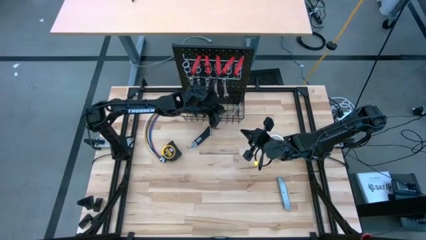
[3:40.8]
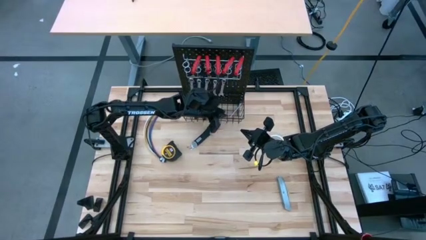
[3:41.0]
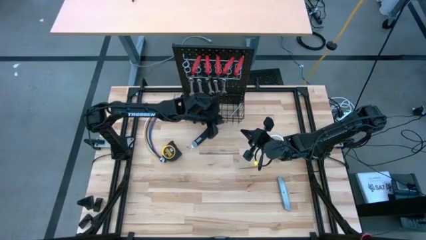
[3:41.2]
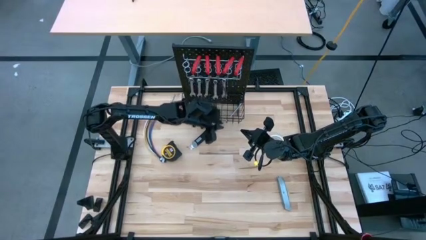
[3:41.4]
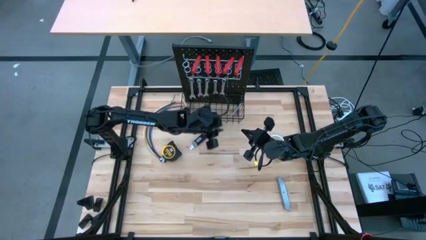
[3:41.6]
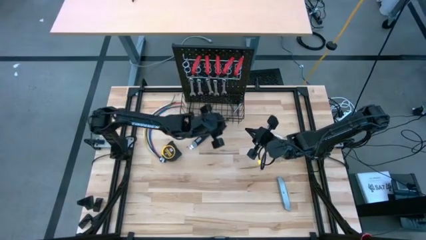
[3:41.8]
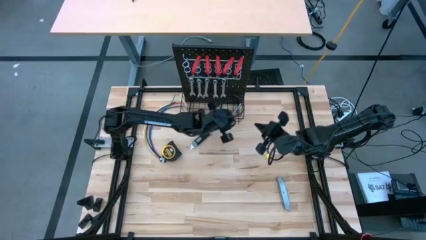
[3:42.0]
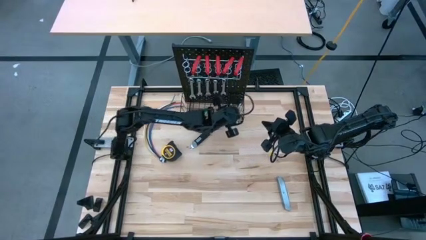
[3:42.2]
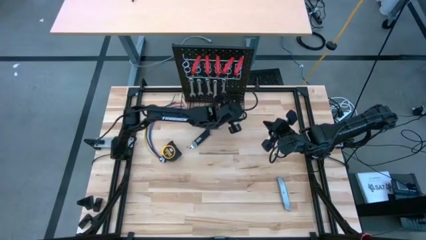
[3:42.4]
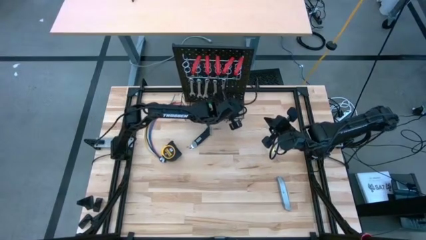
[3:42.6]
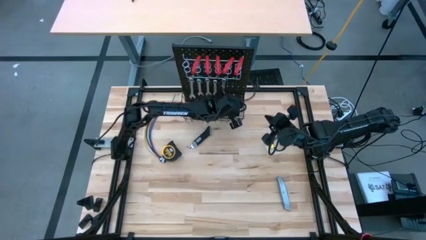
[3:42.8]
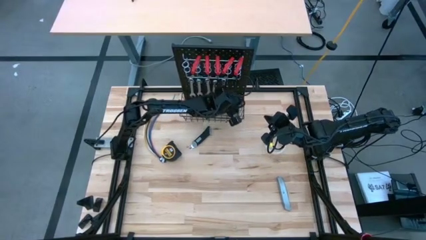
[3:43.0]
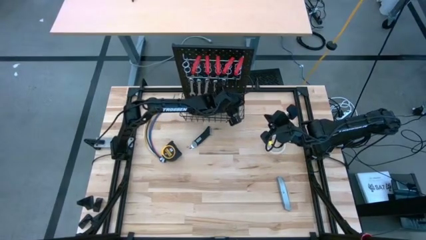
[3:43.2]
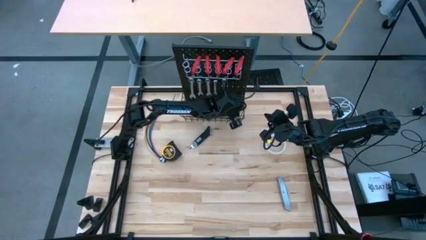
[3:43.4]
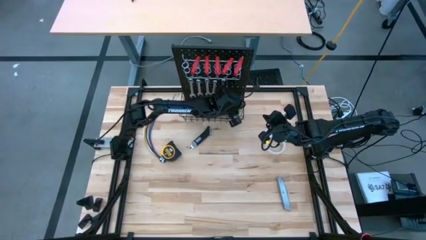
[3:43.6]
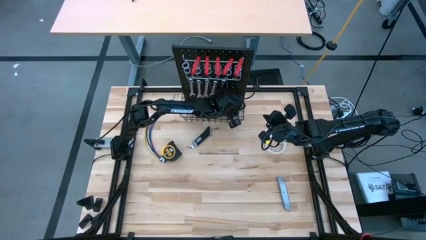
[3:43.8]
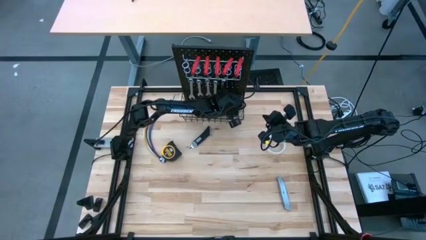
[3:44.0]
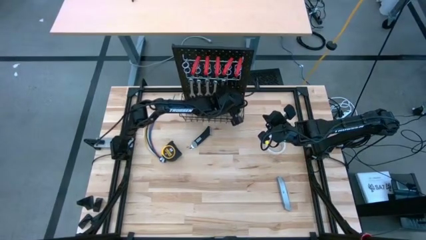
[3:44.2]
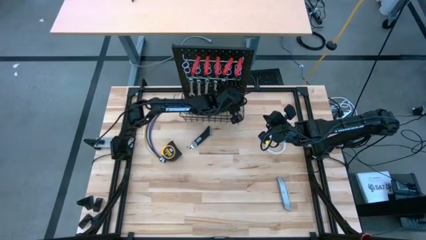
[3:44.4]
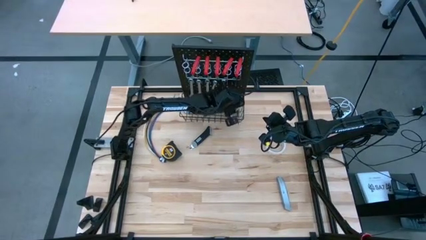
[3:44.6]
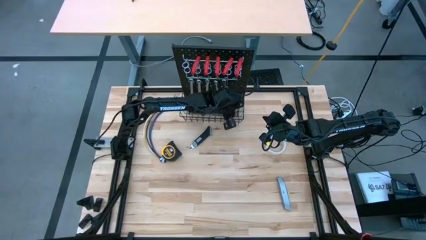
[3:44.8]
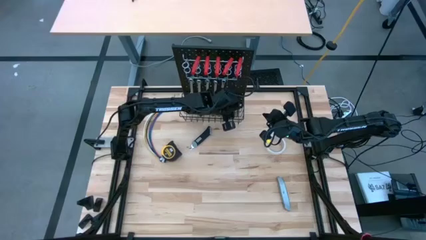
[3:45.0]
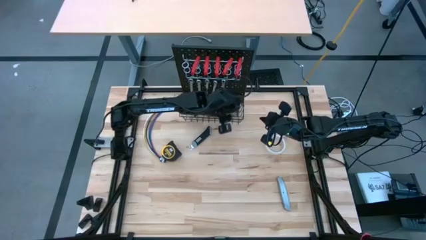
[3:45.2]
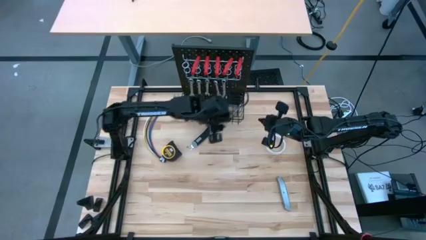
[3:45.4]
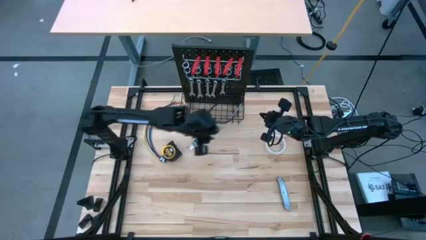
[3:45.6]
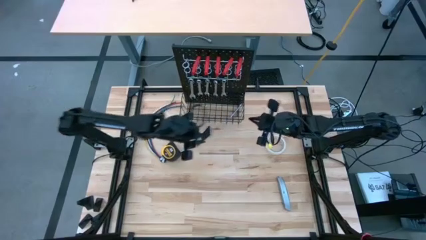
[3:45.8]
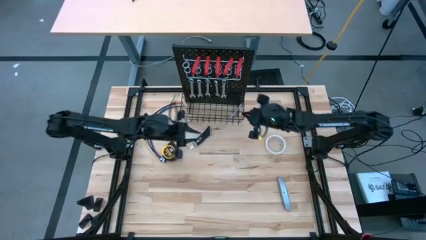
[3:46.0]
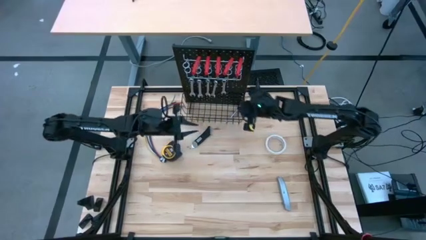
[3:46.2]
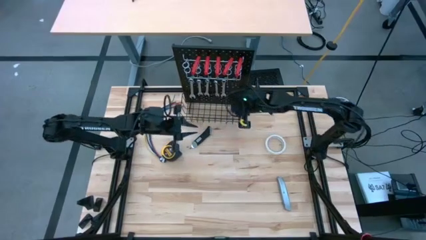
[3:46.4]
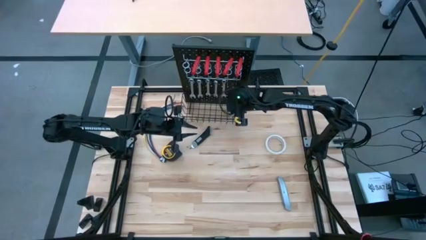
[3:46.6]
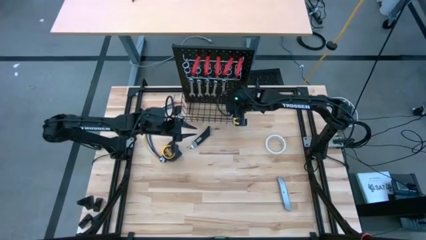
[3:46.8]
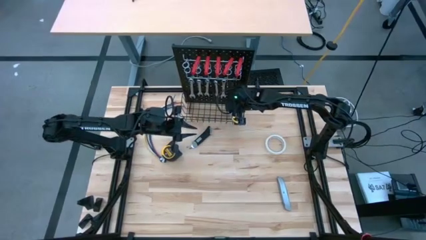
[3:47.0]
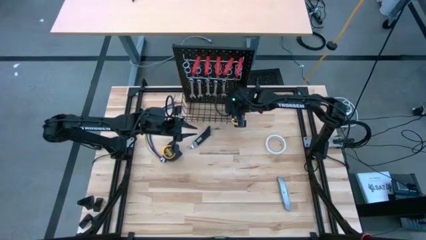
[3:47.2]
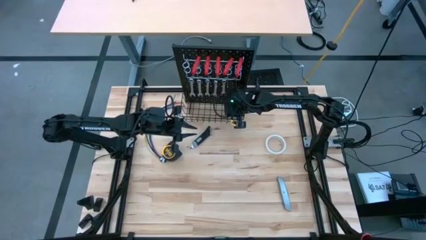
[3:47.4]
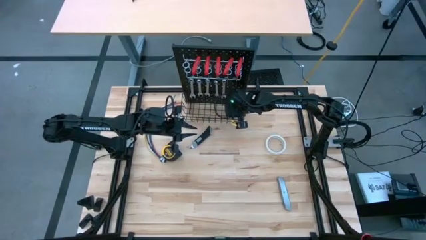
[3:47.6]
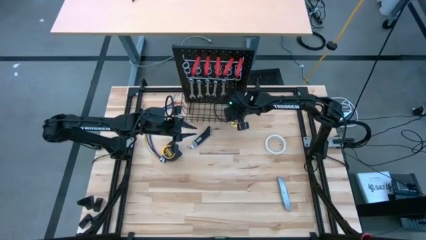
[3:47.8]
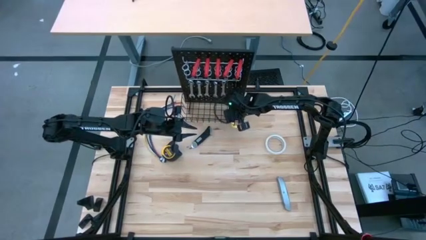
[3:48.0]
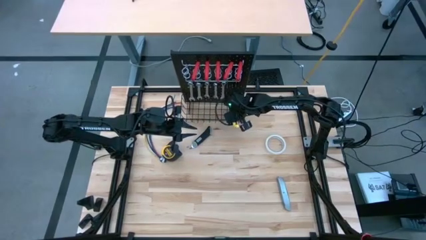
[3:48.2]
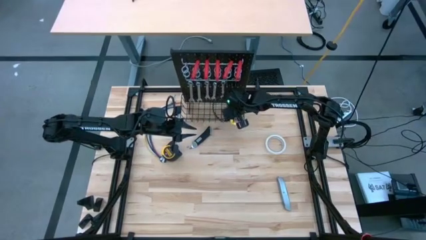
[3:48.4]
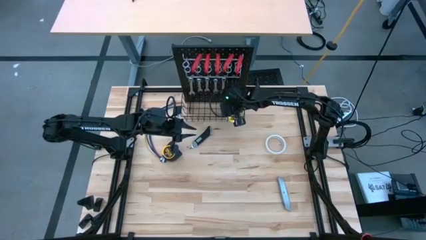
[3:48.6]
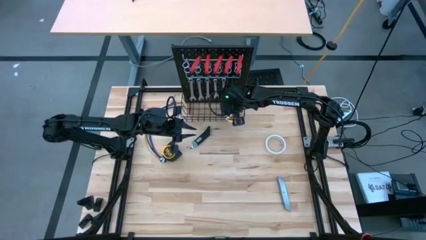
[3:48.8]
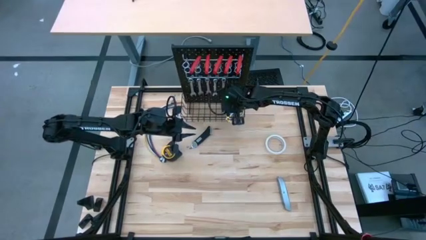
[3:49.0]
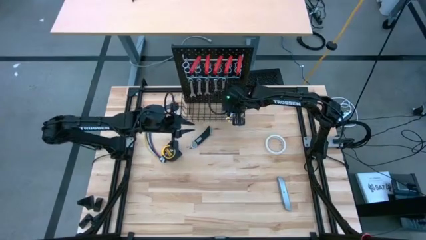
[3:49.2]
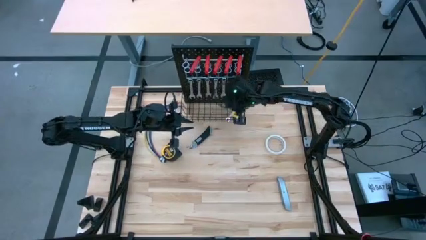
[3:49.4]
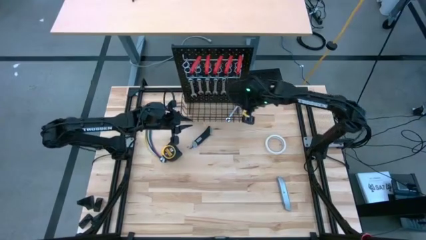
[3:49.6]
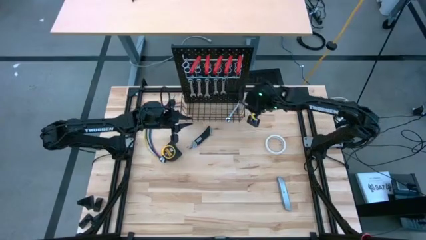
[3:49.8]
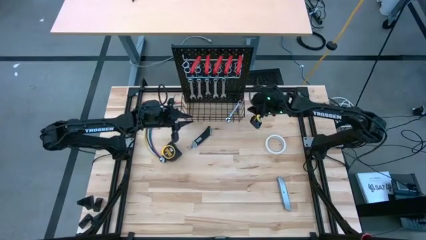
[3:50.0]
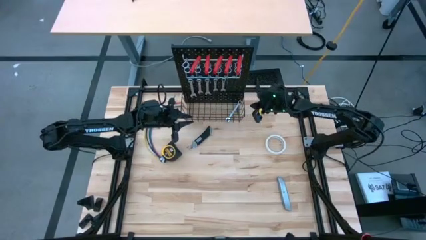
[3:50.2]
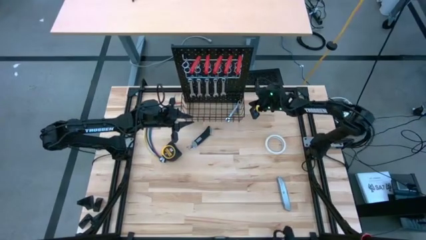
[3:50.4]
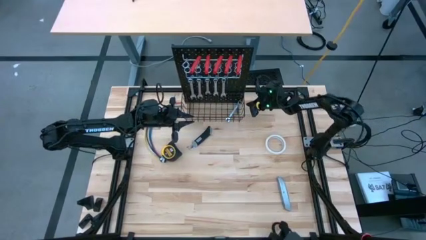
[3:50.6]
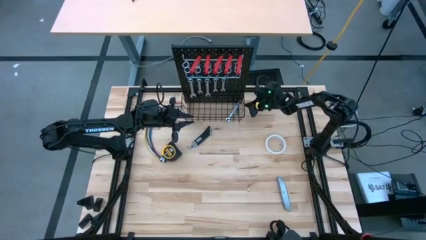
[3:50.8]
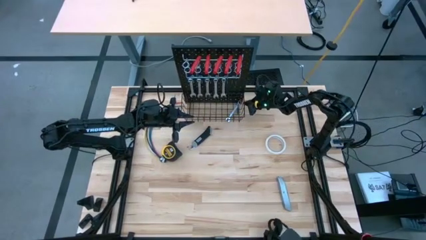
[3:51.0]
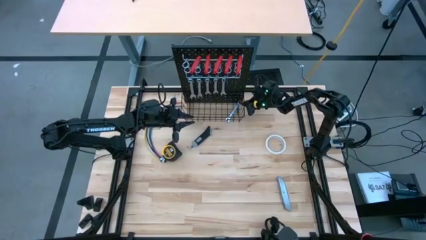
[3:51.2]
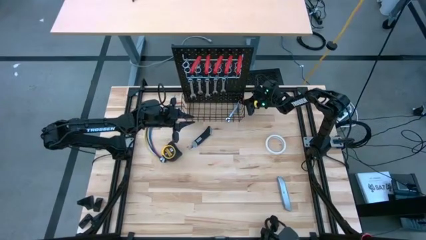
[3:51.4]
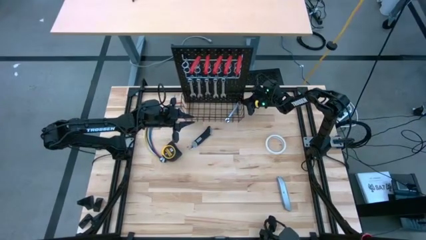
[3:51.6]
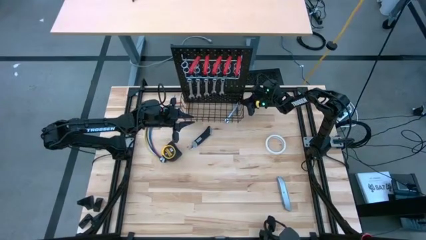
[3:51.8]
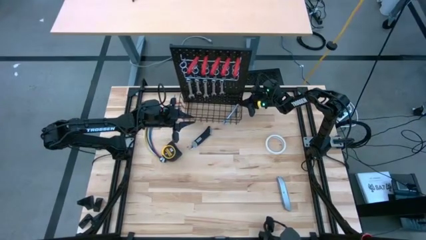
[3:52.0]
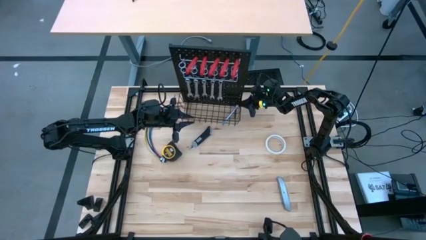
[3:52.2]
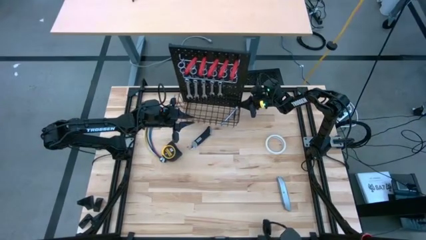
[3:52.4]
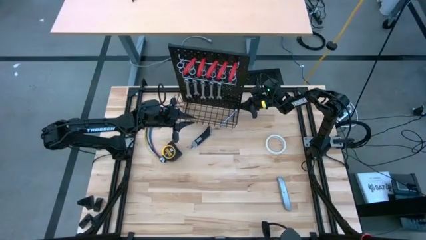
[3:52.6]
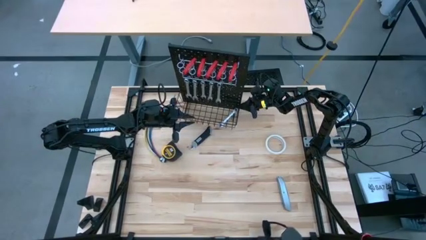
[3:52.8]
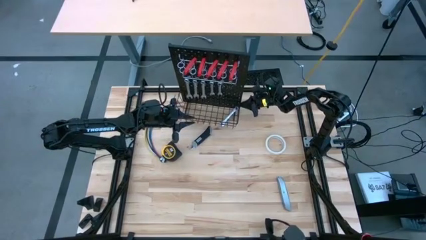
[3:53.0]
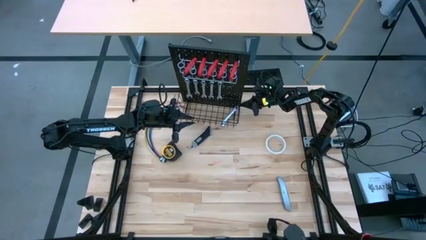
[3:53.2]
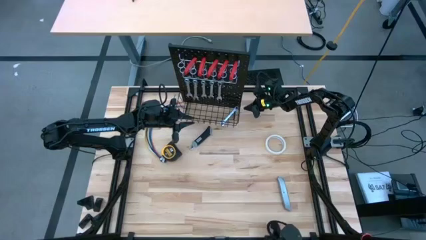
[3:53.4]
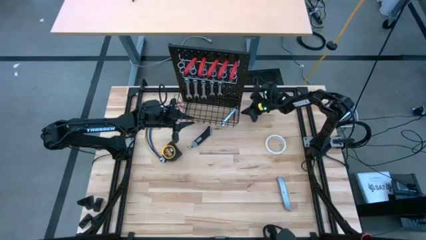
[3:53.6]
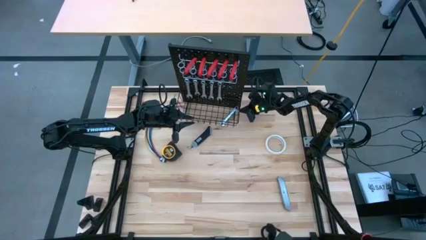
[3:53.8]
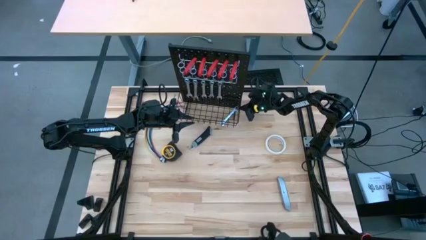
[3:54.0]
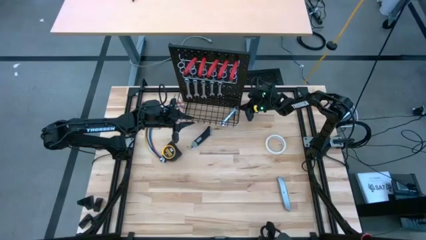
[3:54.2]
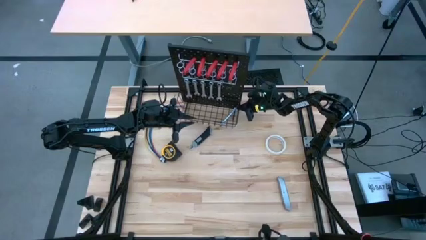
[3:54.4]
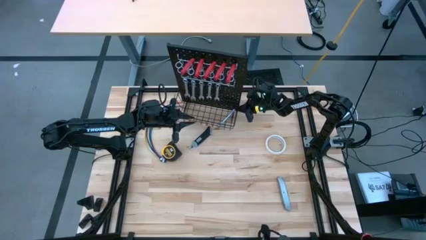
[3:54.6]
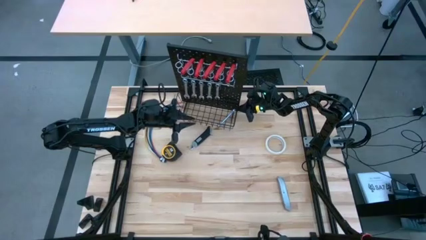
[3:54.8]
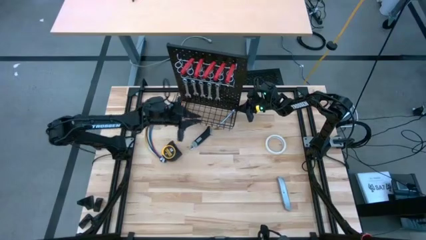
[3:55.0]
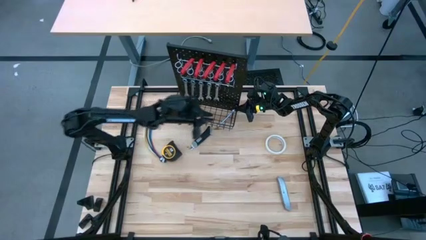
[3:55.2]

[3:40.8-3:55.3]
Task: Hang tools onto peg board
Hang the wrench on the peg board

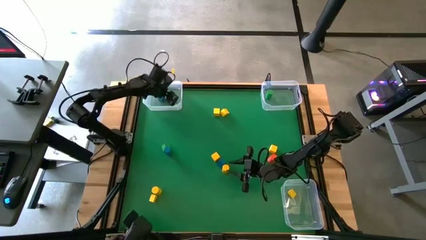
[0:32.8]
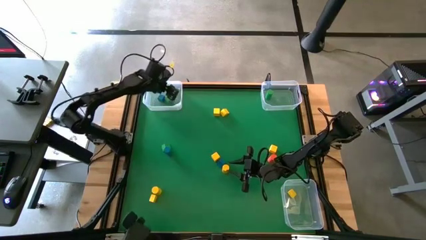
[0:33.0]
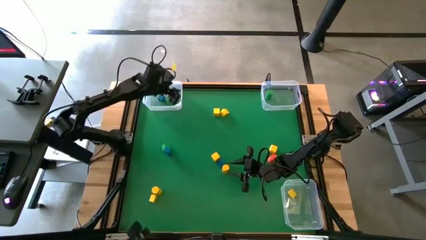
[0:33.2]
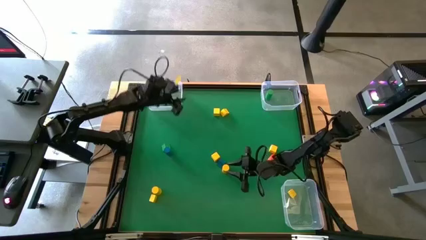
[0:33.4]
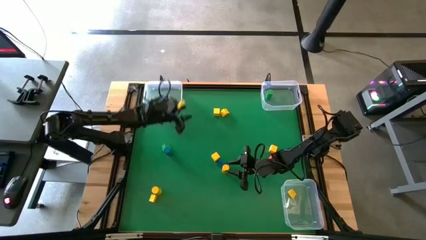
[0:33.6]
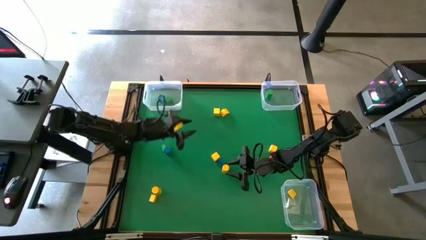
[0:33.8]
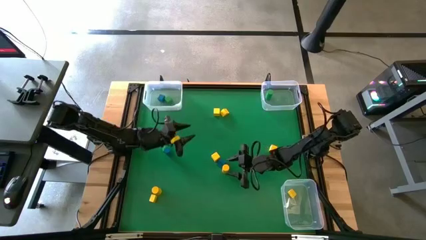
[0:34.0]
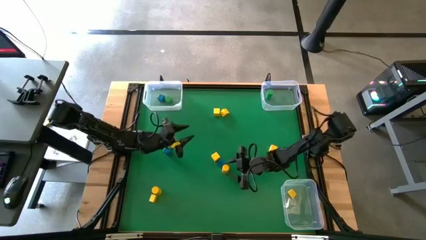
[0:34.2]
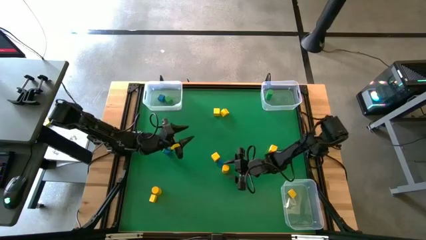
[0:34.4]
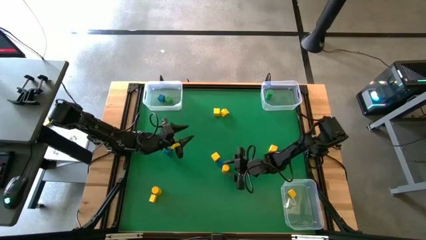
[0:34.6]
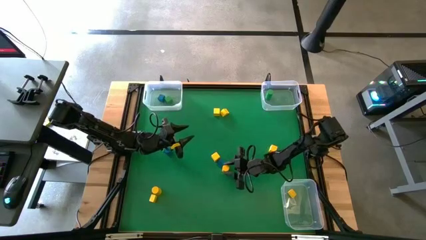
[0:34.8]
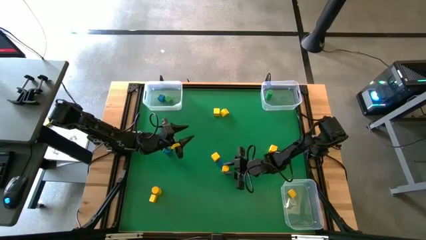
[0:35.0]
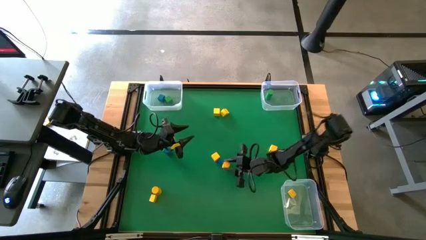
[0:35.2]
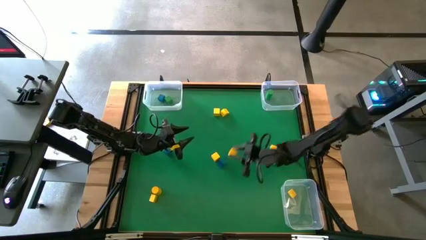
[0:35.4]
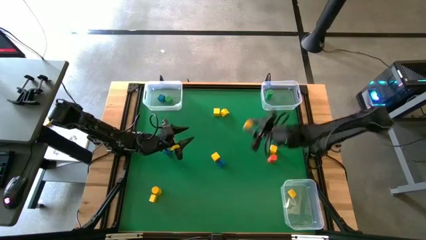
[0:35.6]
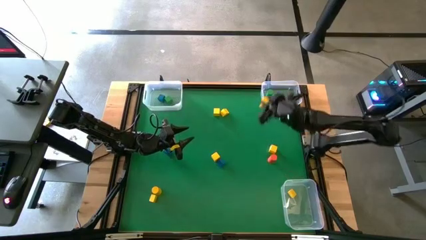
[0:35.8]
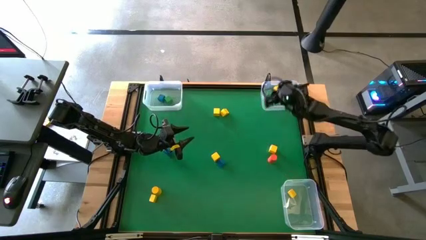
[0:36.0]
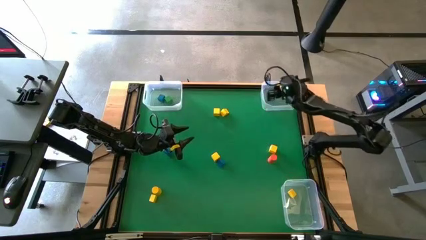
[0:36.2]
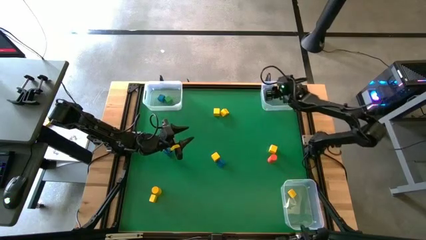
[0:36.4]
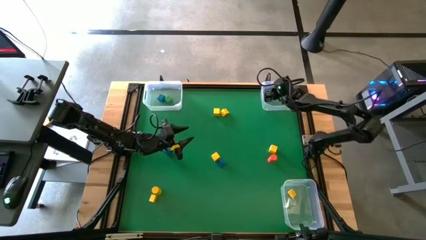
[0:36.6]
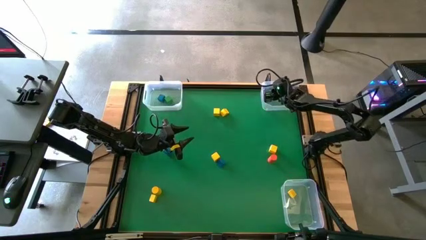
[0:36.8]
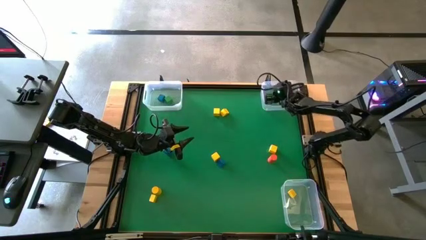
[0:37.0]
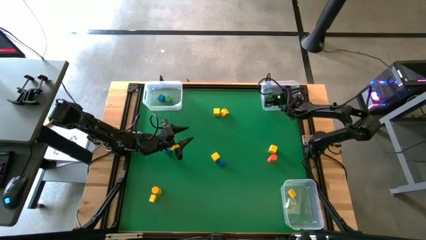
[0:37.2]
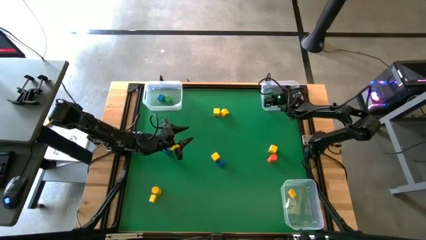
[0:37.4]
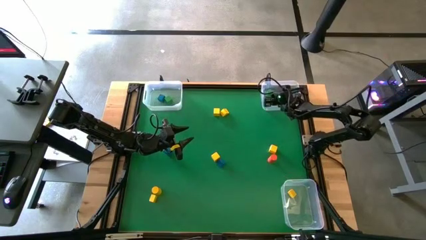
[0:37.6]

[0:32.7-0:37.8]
Task: Sort blocks by size
Put the yellow cylindrical block into the top right transparent bin
